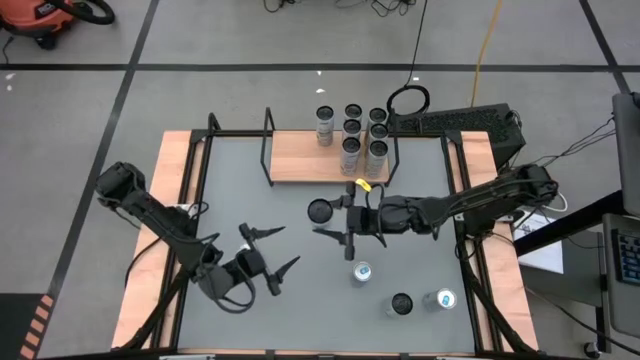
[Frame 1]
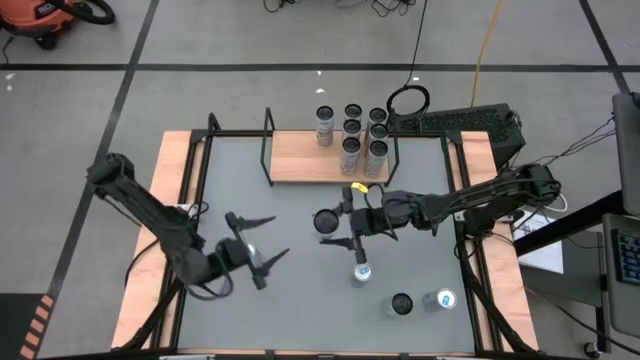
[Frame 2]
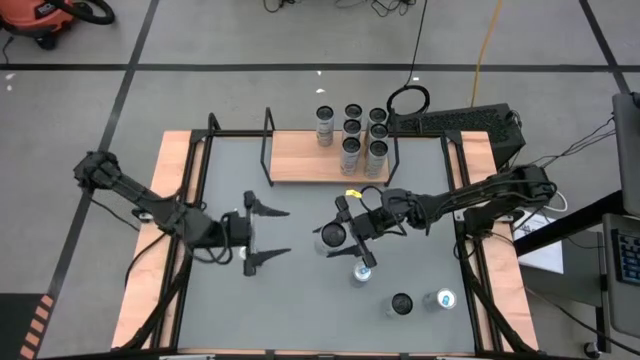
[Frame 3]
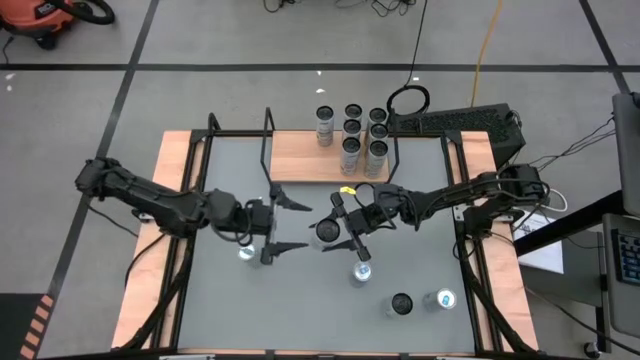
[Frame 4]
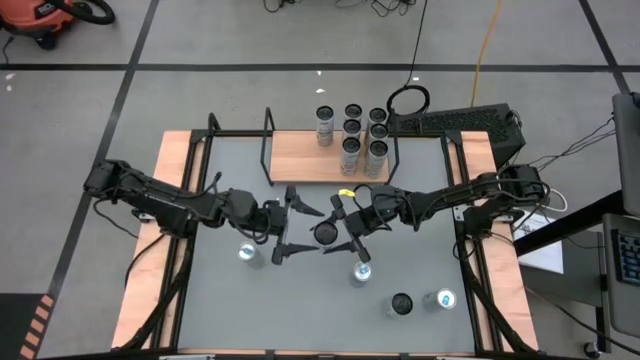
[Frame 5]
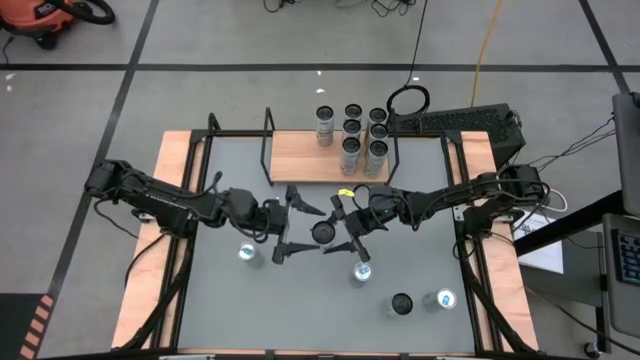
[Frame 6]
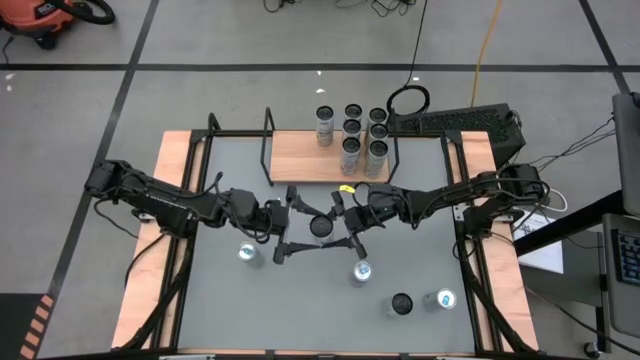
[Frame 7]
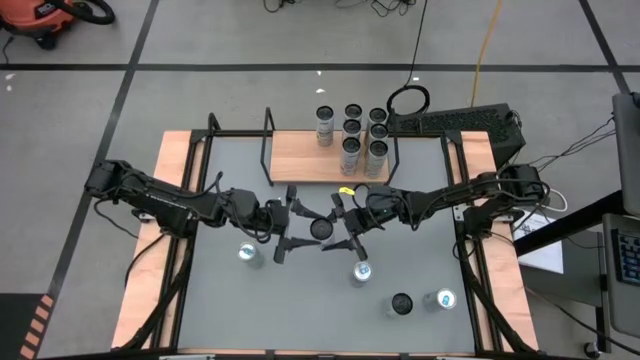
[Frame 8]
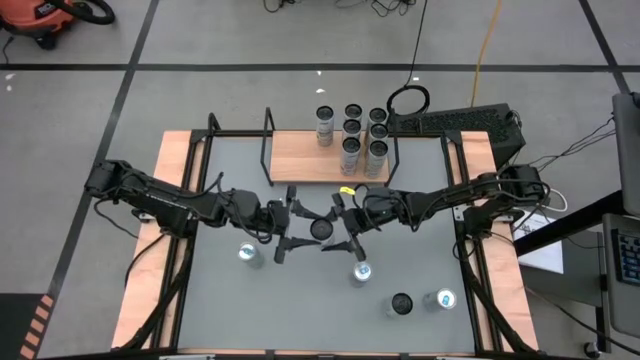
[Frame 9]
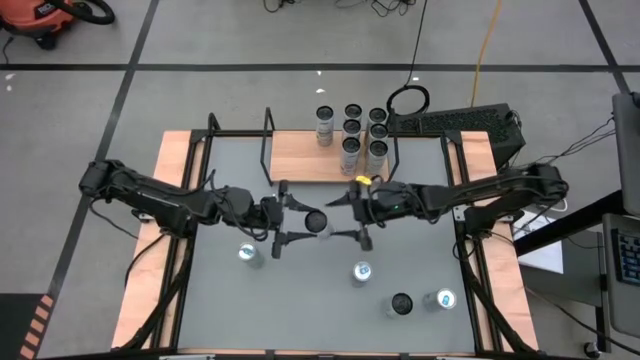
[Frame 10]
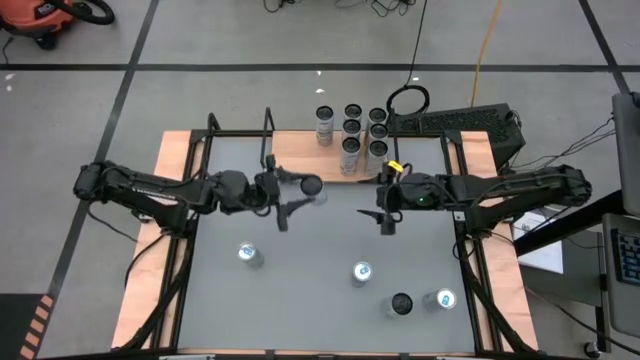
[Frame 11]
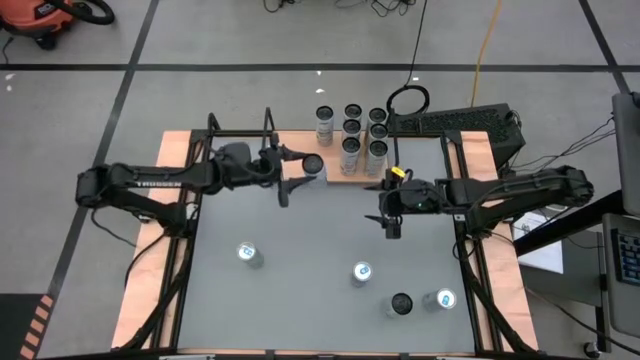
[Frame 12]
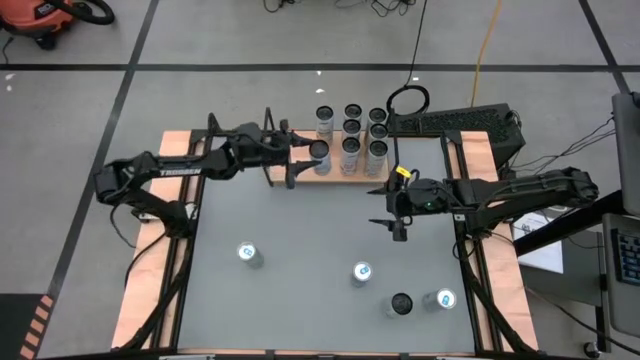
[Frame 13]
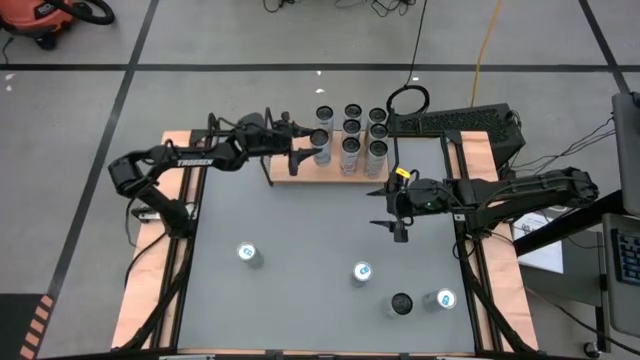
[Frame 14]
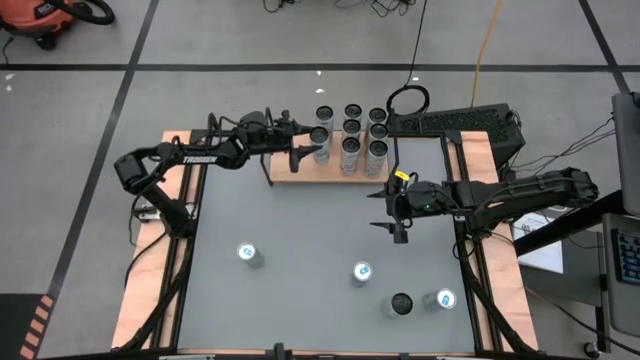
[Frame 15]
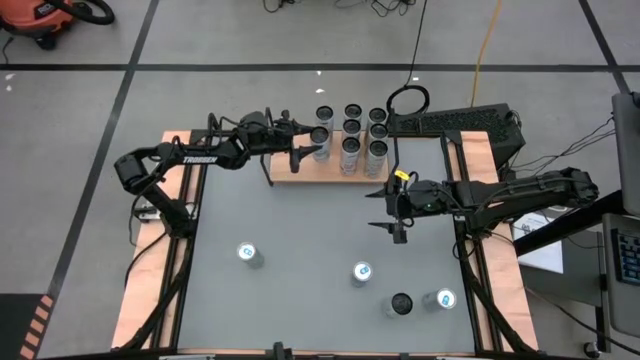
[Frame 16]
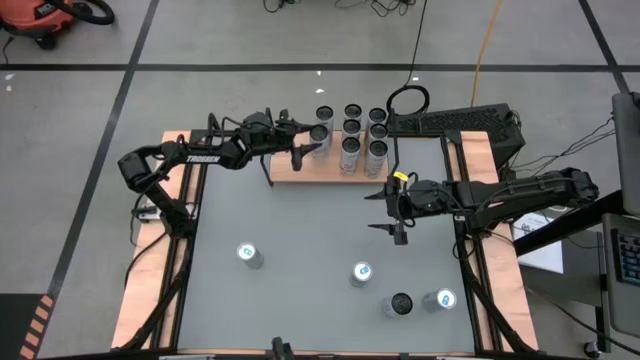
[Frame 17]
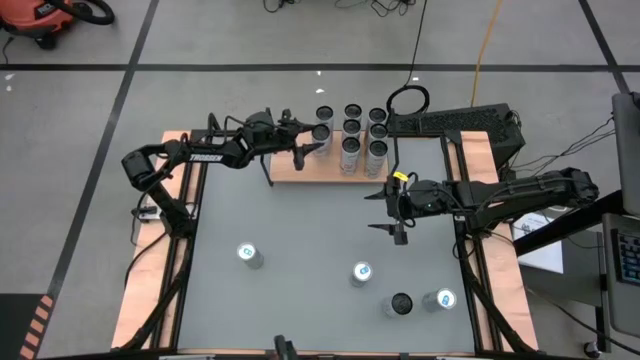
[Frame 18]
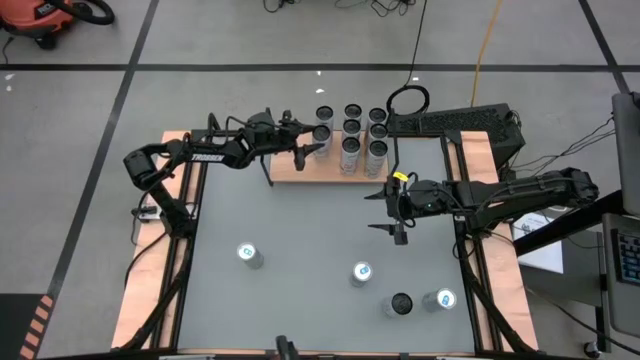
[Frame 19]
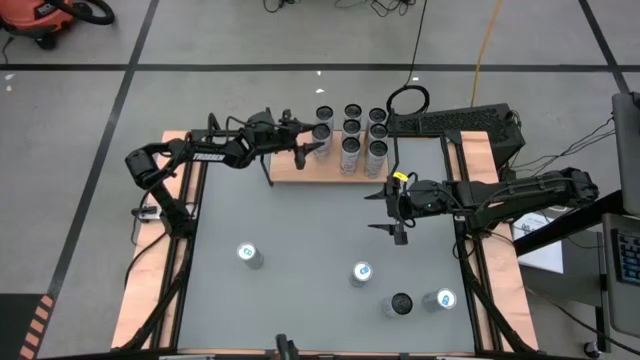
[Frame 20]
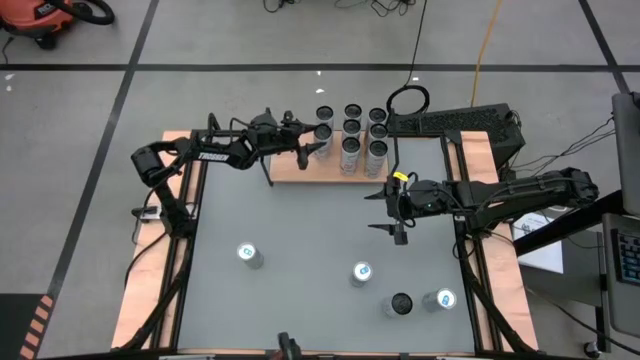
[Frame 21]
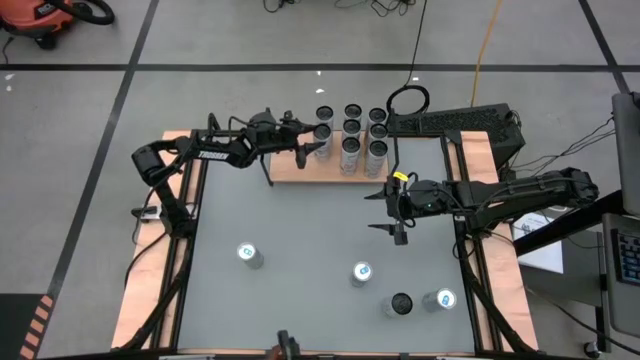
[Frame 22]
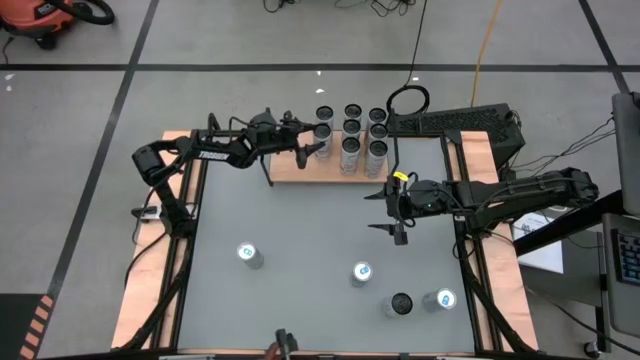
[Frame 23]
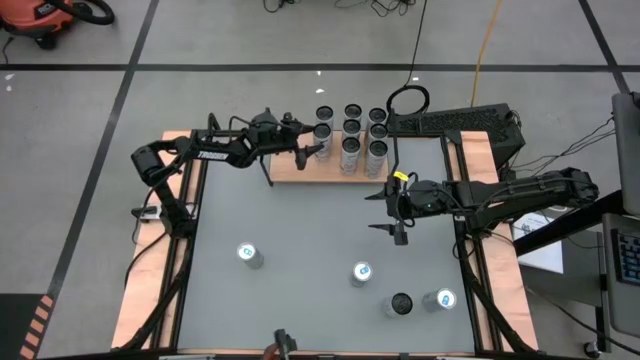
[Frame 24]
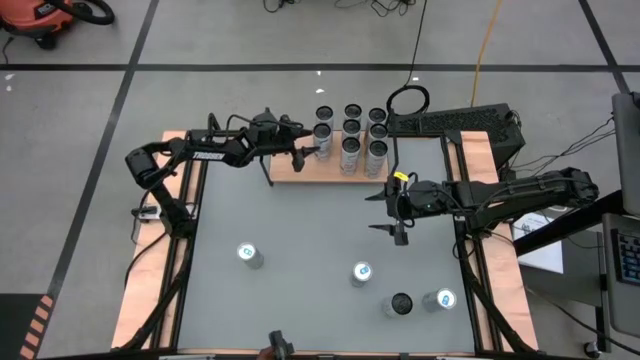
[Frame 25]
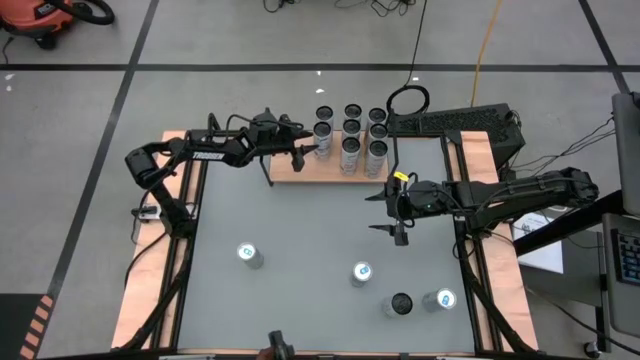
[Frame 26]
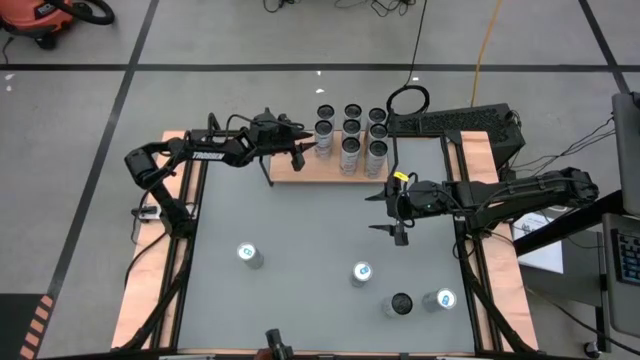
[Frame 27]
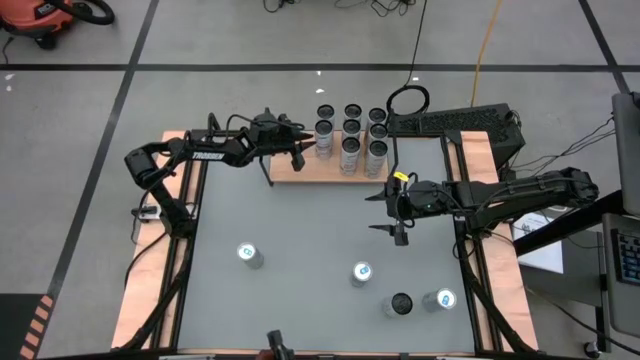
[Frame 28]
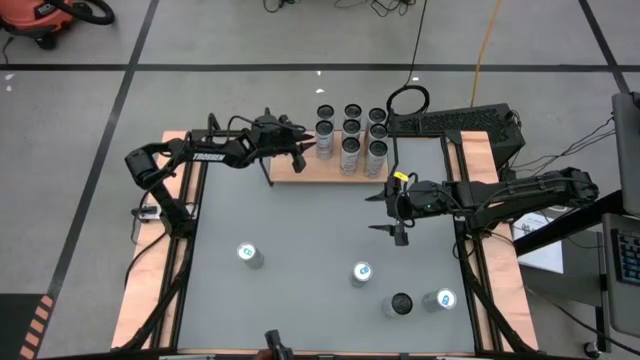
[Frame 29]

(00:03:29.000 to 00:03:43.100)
Task: Place canned beverage on shelf
Put the top white blue soda can on the shelf aligned with the white blue soda can

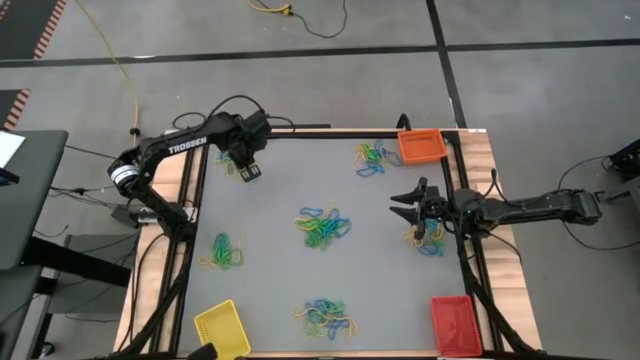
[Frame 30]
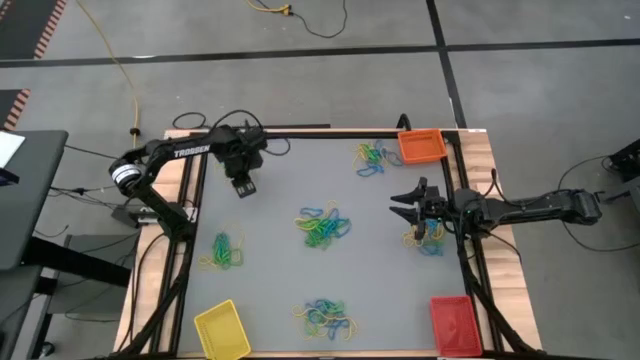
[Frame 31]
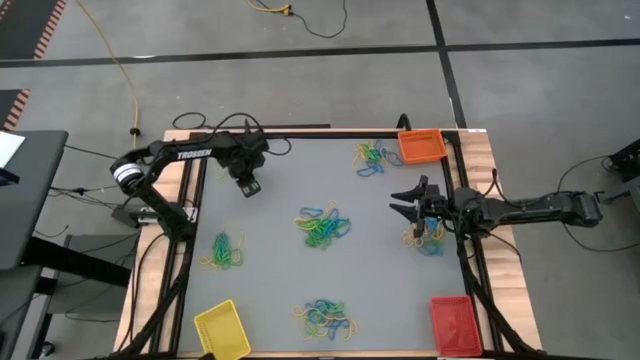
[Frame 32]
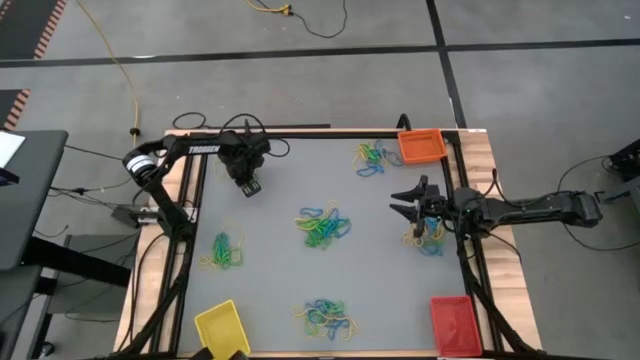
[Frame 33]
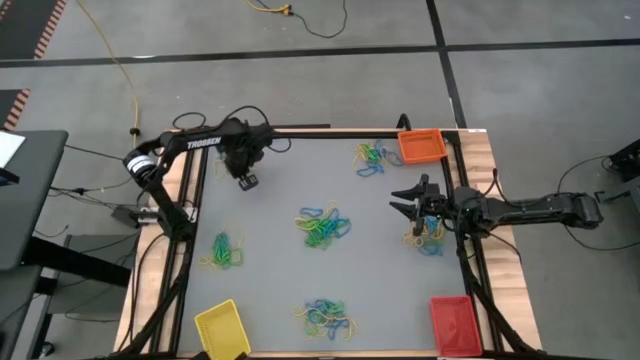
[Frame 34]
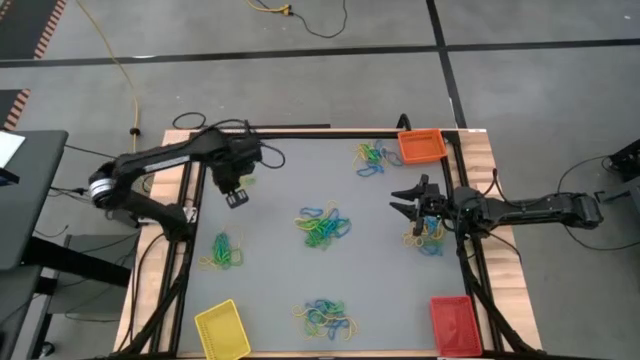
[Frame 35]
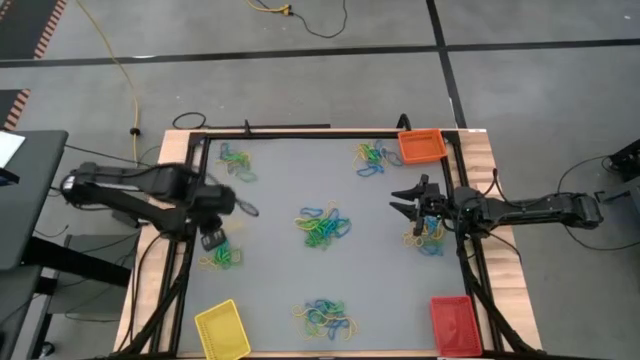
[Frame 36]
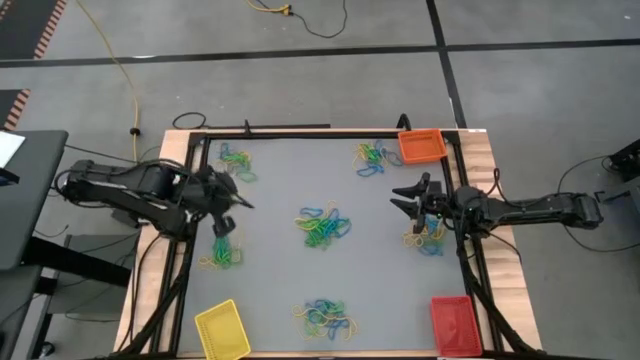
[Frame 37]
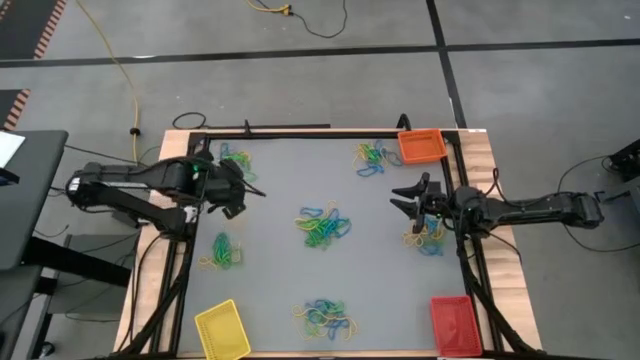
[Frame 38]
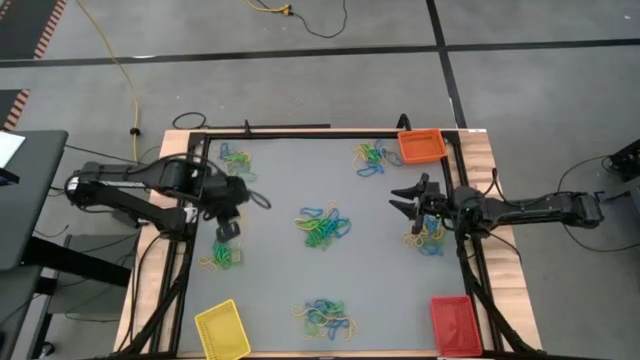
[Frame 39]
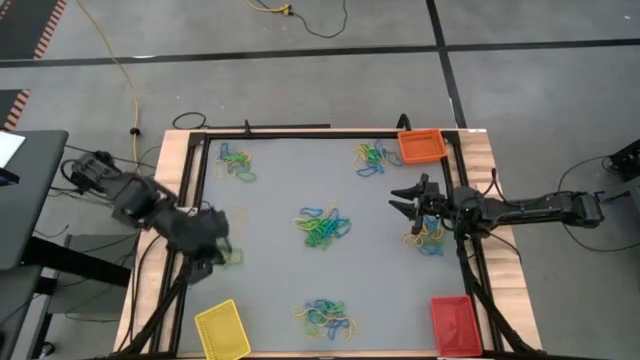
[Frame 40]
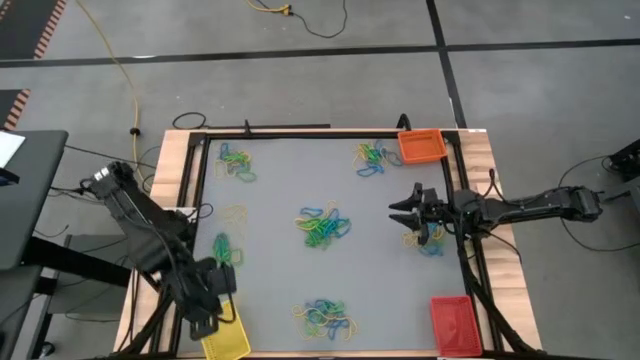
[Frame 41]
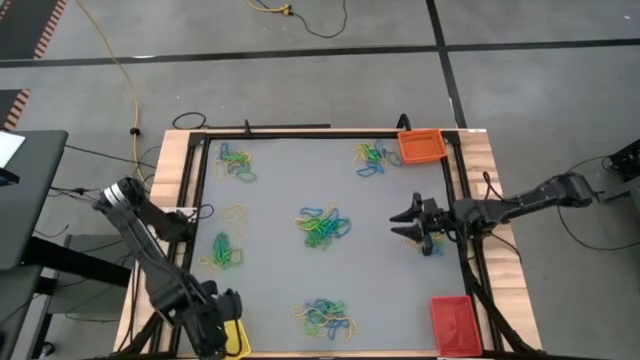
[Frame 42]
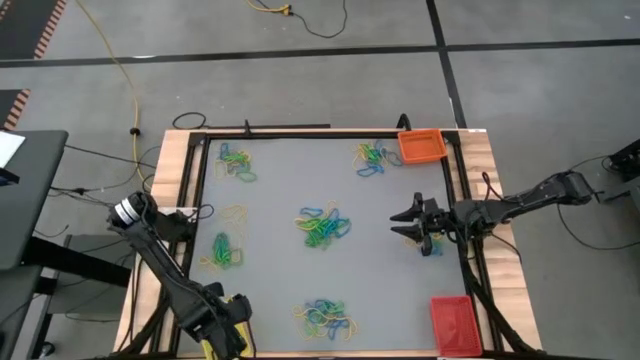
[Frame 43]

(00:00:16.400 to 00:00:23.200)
Task: Sort rubber bands into baskets
Put the yellow rubber band into the yellow bin
